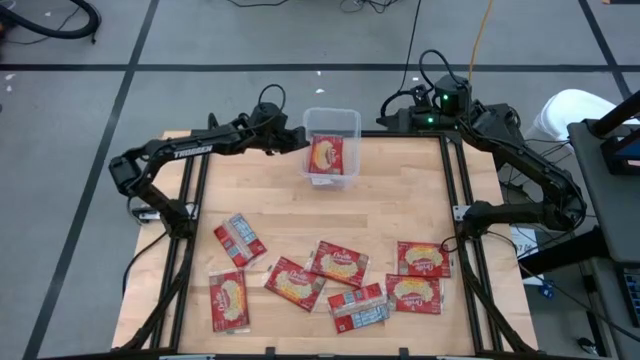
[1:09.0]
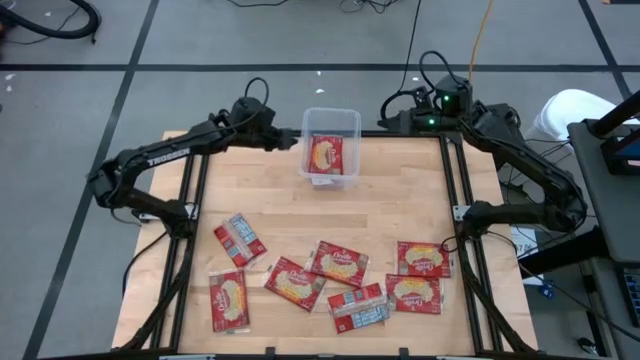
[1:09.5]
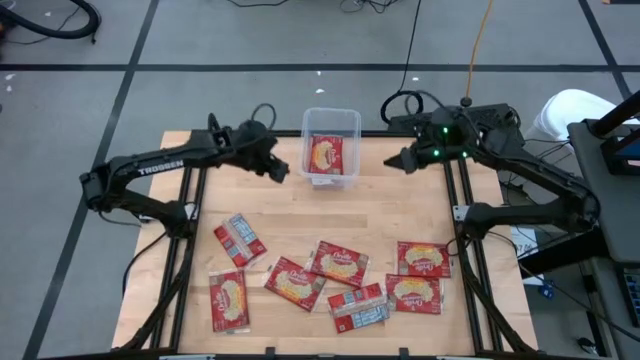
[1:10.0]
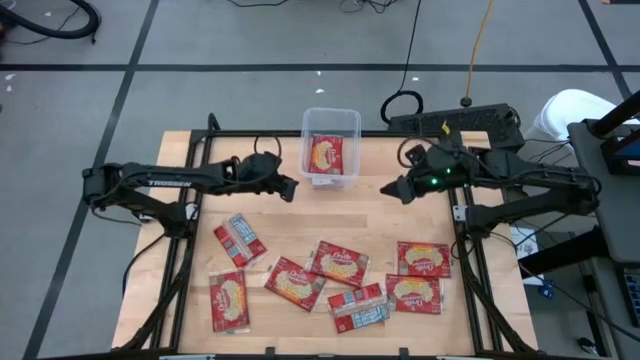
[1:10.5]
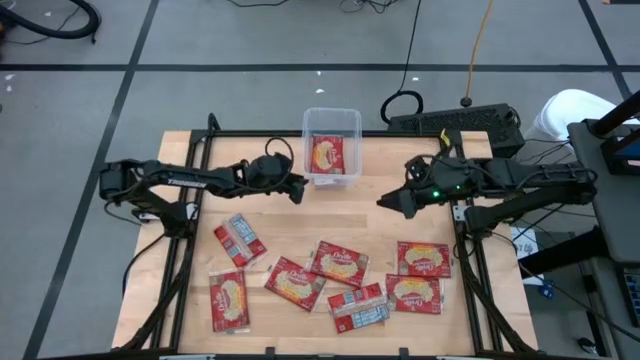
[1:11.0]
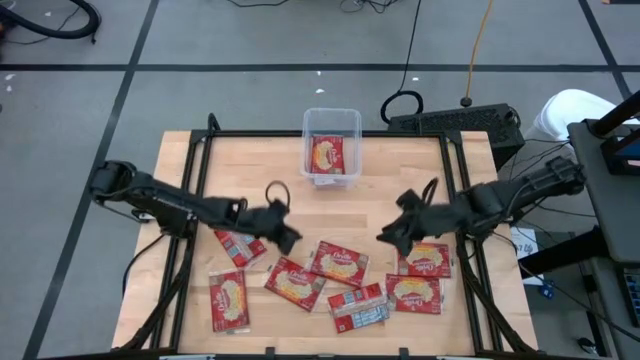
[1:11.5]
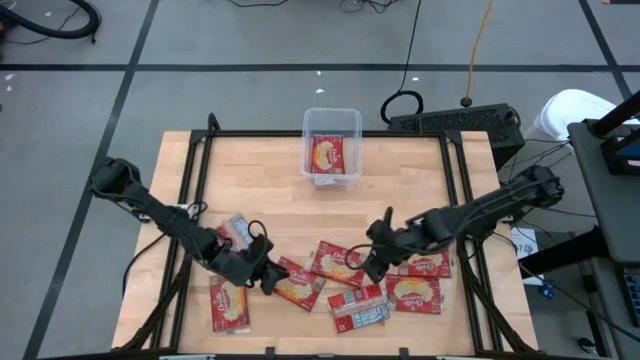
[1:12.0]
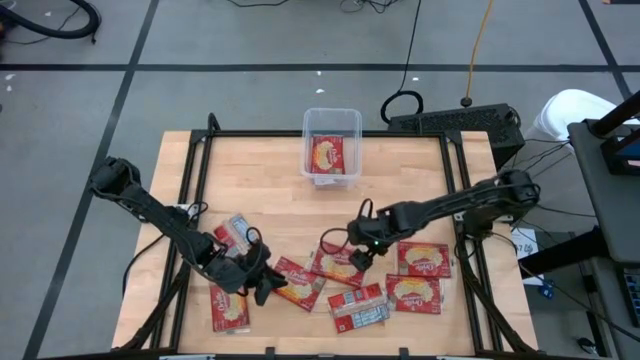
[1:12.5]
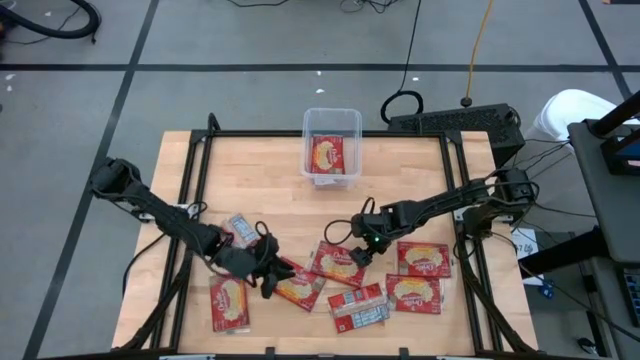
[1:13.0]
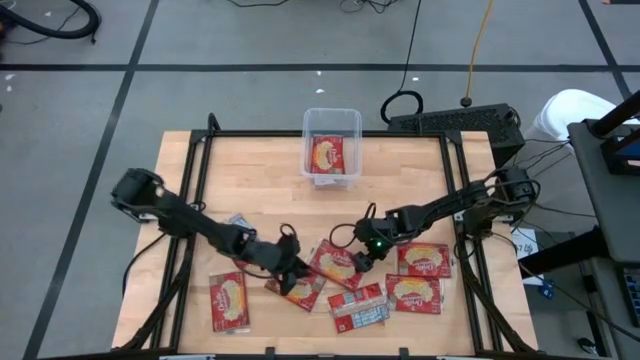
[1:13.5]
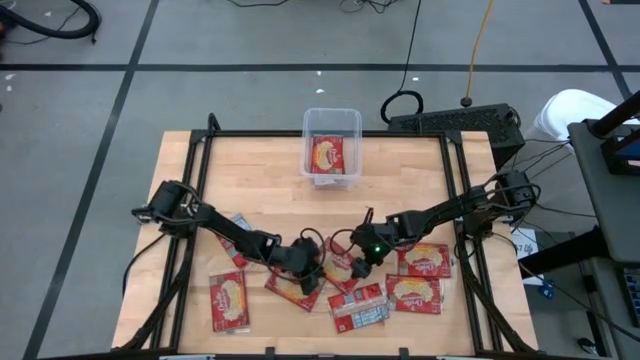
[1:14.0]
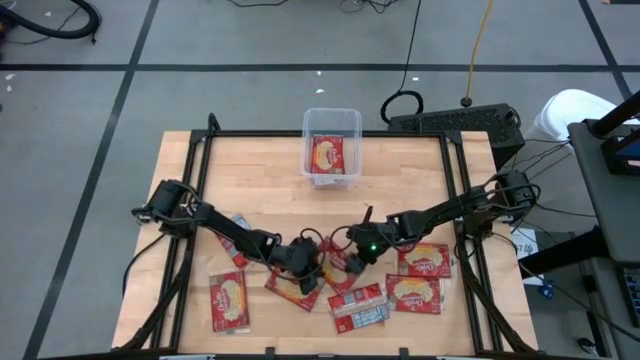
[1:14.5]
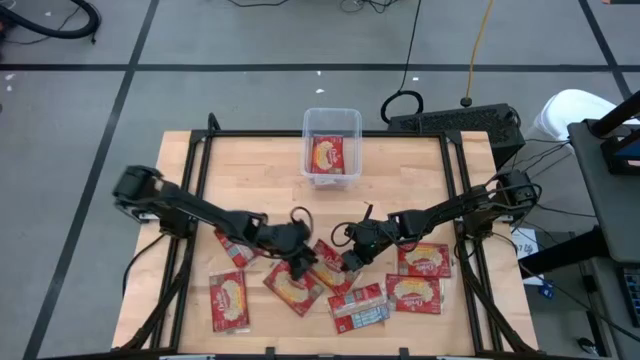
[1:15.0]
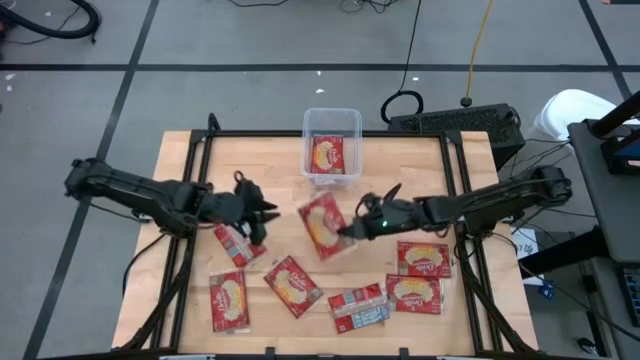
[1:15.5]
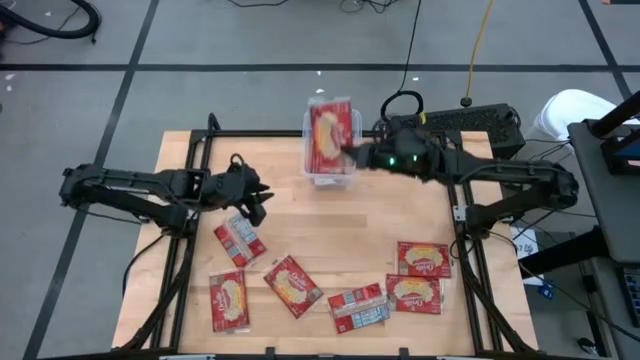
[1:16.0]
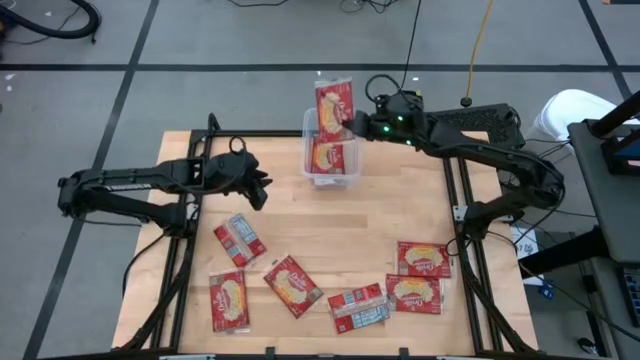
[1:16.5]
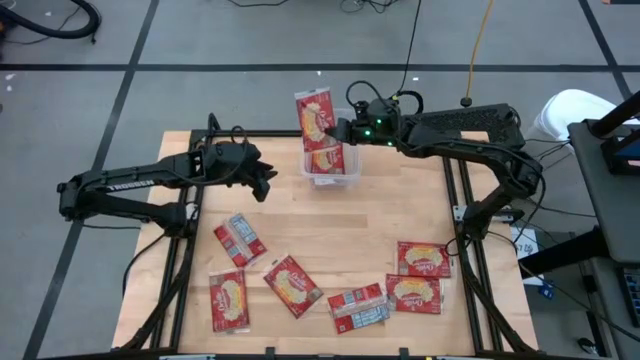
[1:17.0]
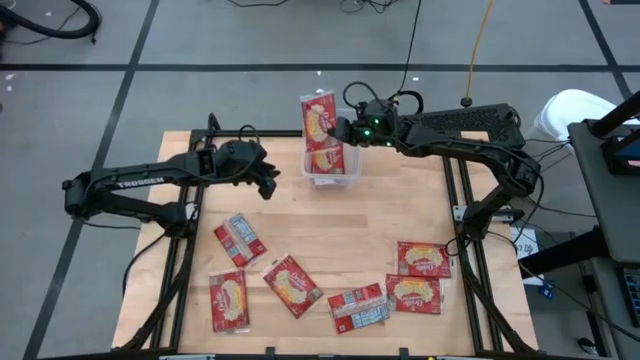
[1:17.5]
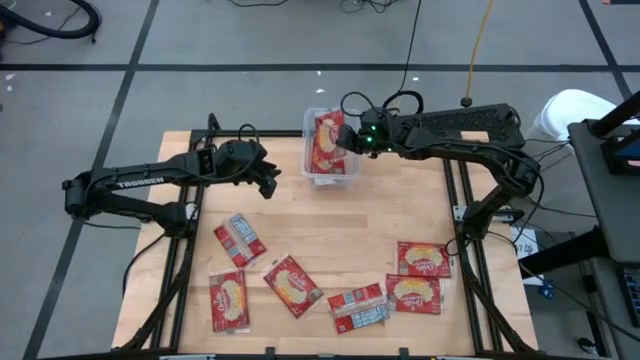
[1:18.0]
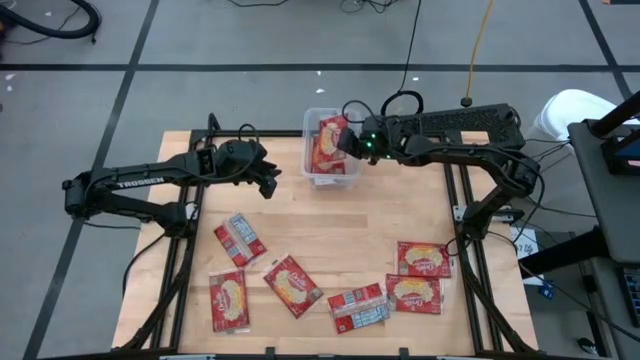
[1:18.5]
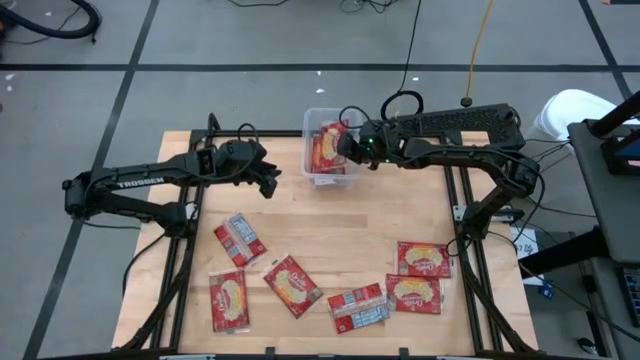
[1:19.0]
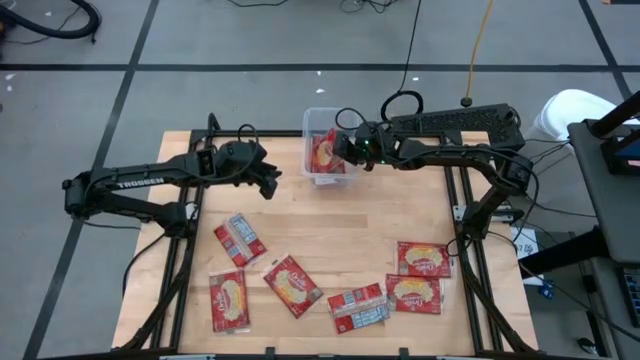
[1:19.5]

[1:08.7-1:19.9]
Task: Sort popcorn bags into baskets
Put the red popcorn bag into the transparent container

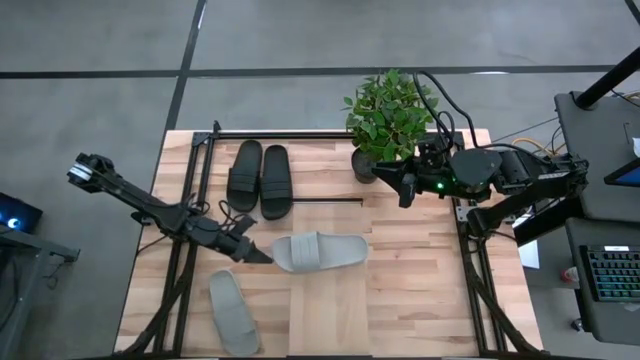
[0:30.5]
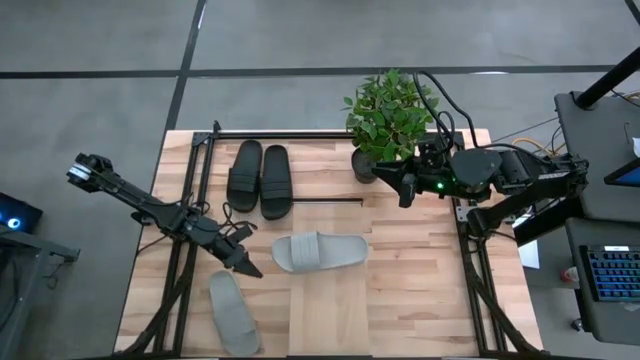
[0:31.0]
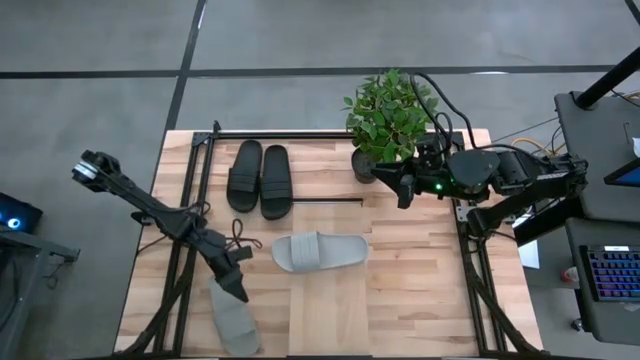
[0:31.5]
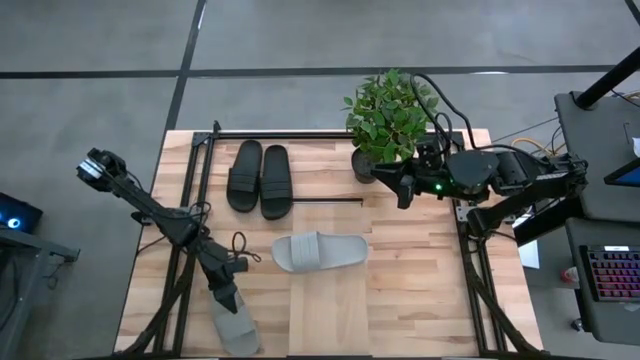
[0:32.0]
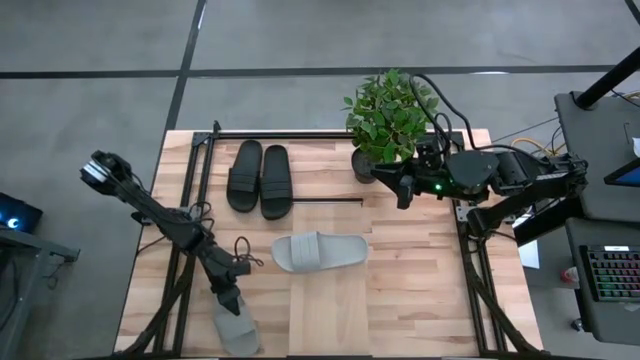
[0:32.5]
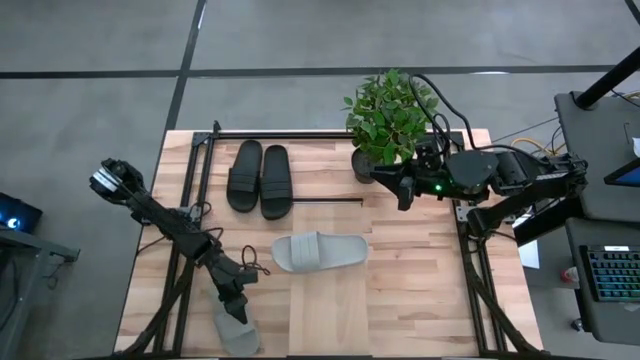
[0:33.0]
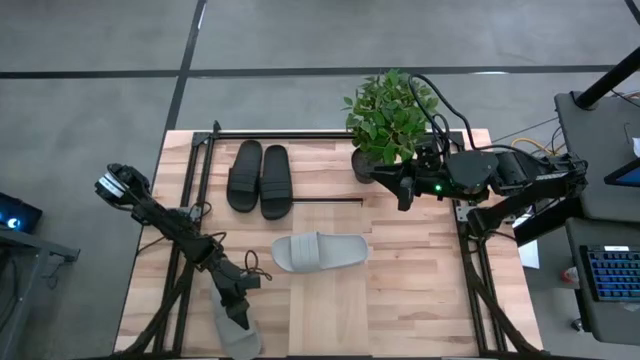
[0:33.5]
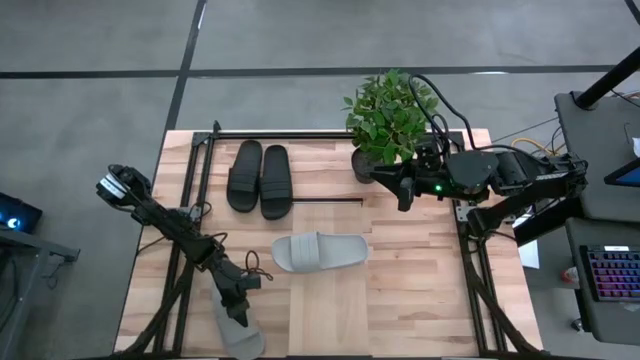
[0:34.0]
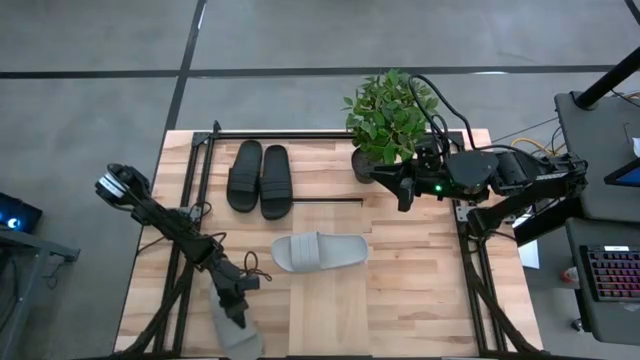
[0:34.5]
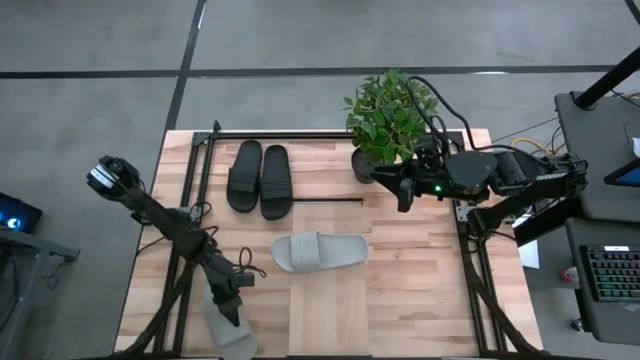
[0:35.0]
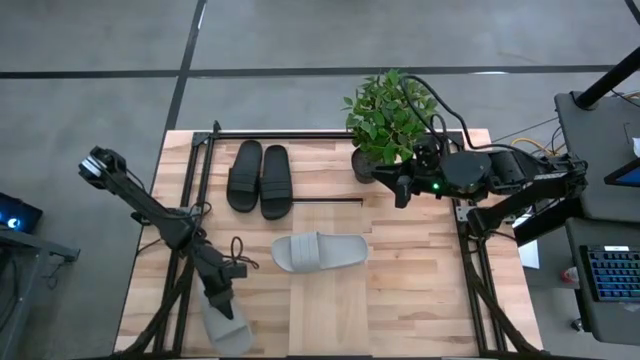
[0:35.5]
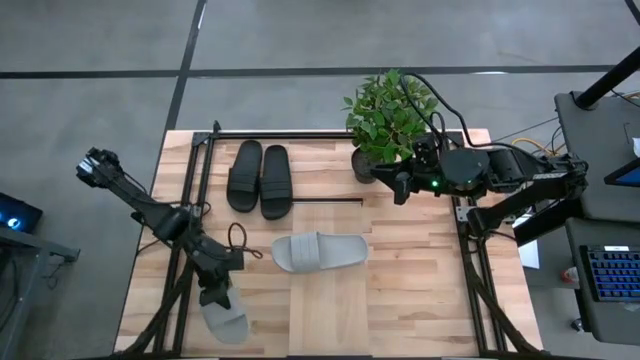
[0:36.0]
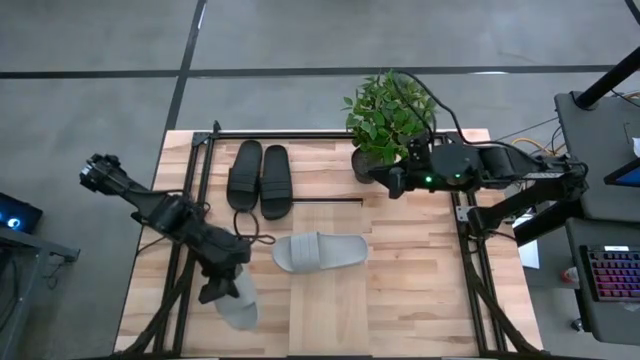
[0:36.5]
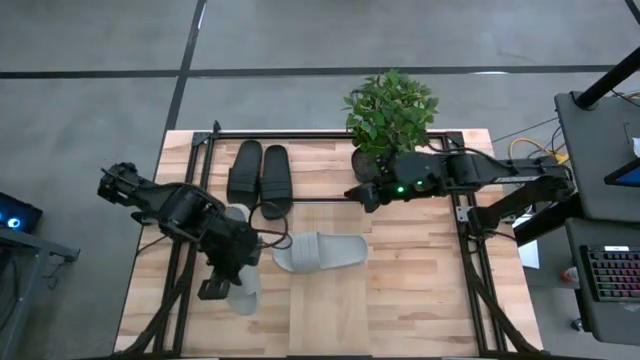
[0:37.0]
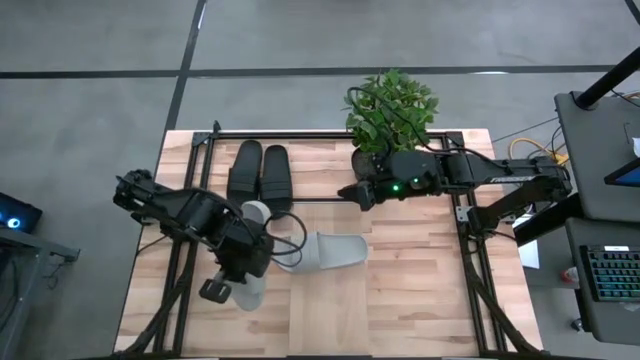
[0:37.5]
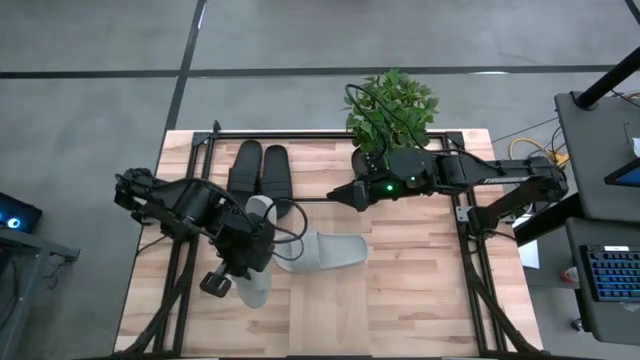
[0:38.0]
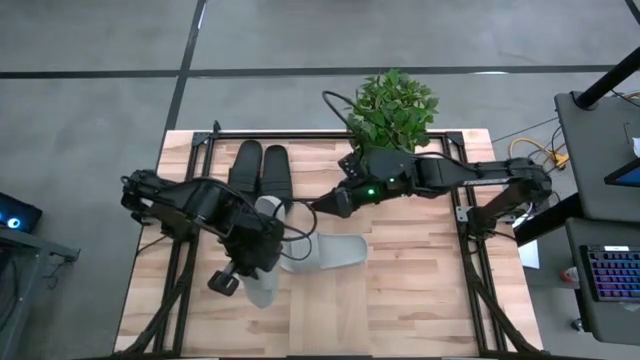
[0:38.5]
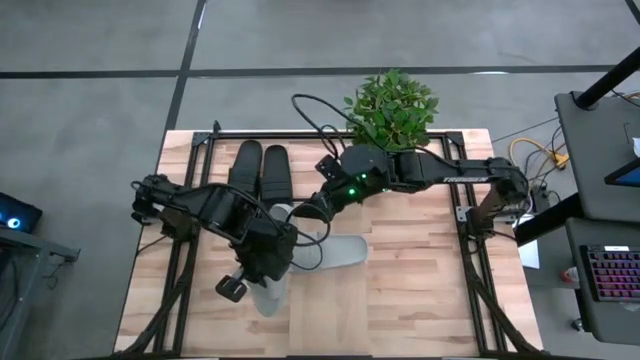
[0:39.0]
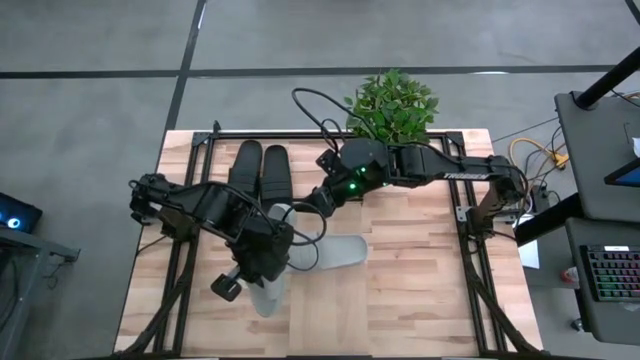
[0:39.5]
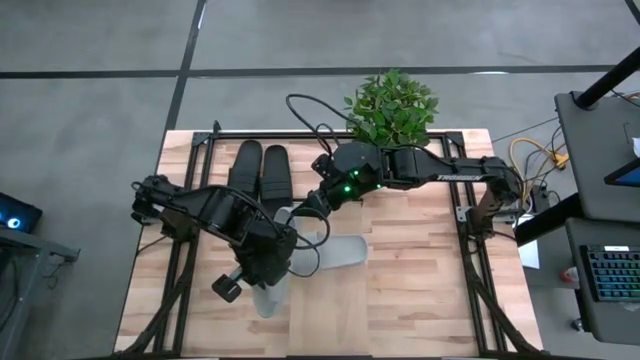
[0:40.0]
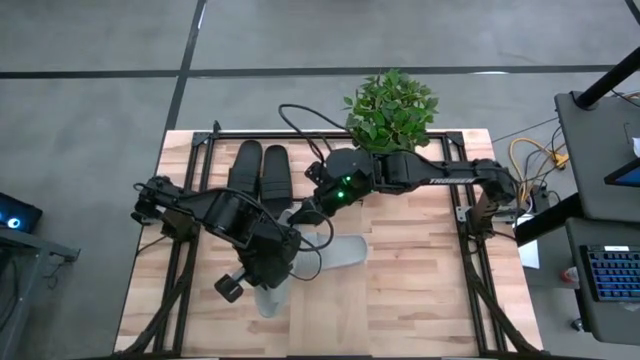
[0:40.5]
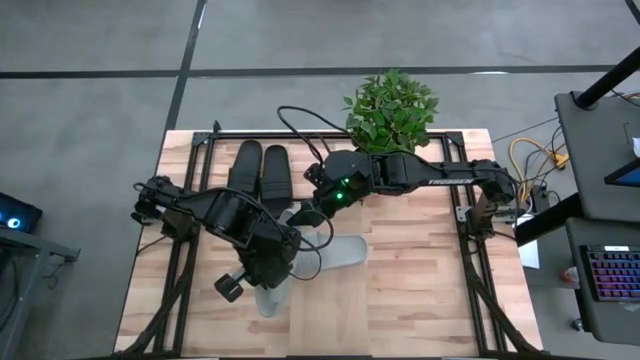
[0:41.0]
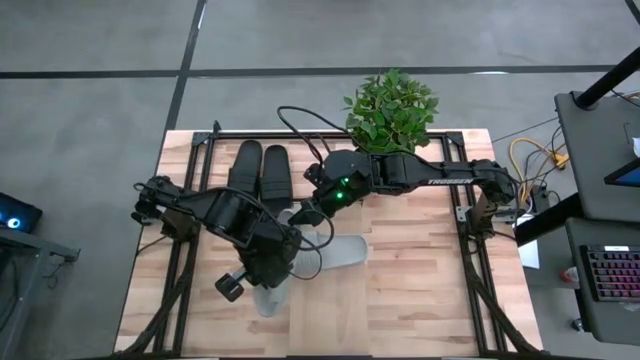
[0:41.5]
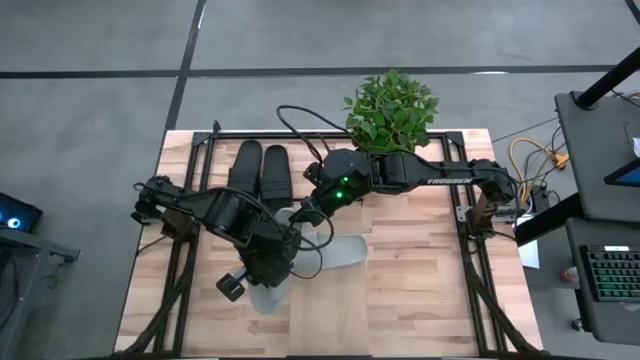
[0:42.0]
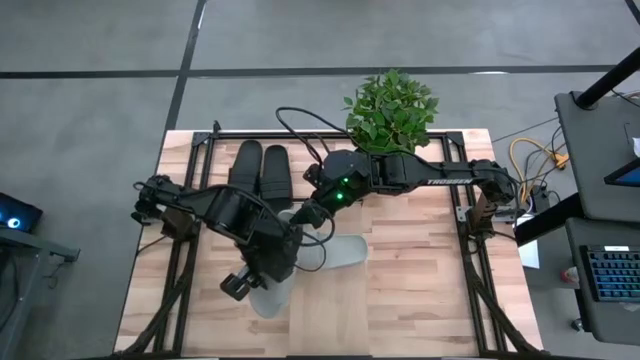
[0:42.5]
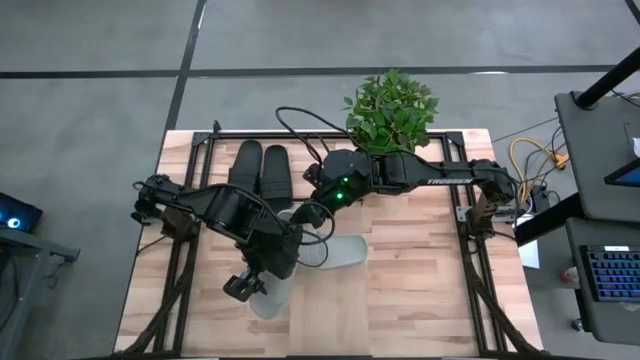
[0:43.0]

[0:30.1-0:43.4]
Task: Pick and place slides into the shelf
Put the gray slipper on the shelf
